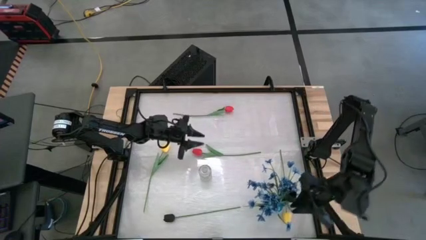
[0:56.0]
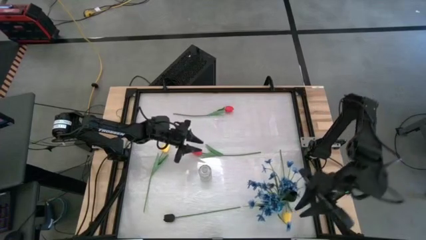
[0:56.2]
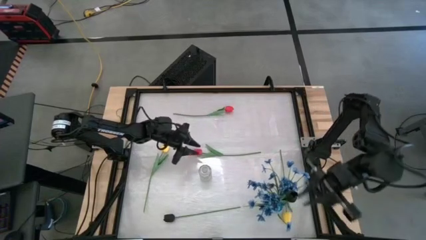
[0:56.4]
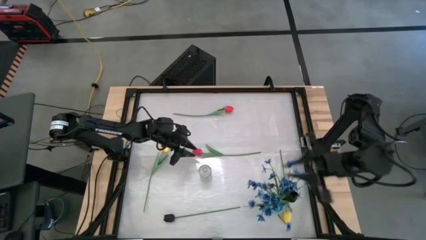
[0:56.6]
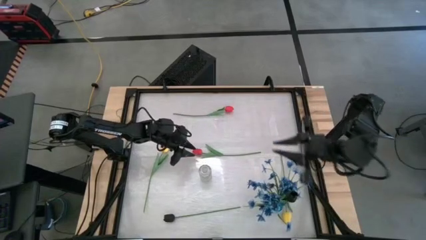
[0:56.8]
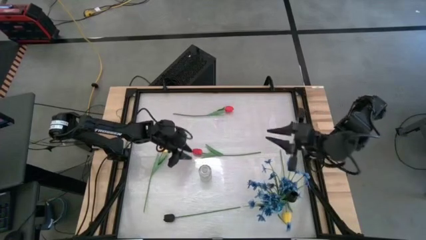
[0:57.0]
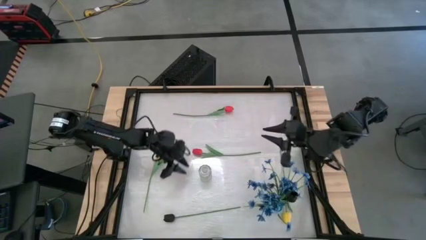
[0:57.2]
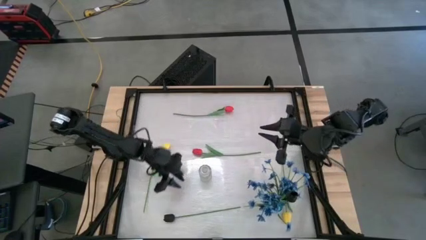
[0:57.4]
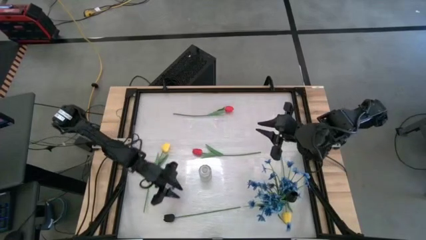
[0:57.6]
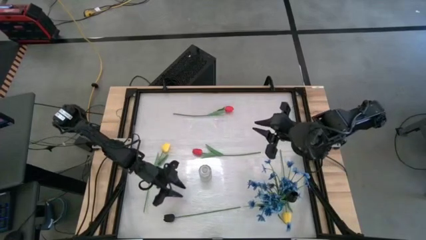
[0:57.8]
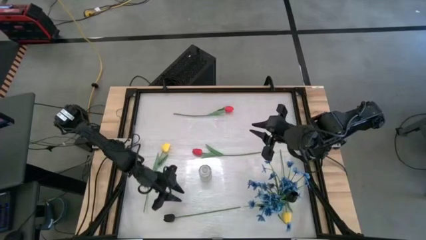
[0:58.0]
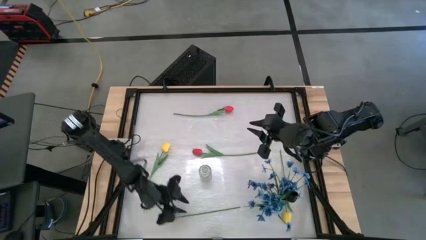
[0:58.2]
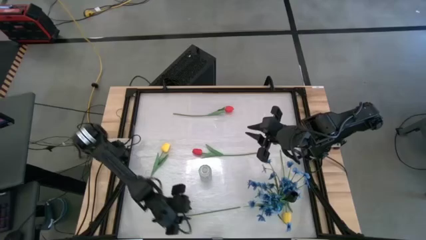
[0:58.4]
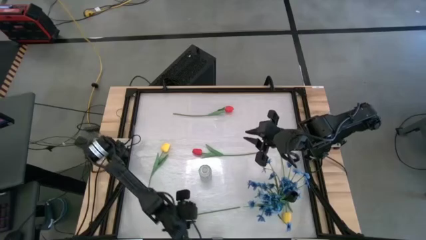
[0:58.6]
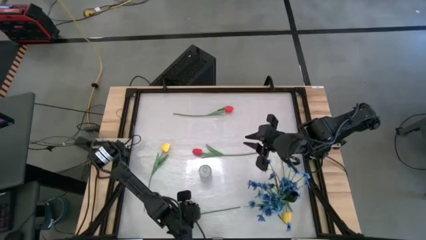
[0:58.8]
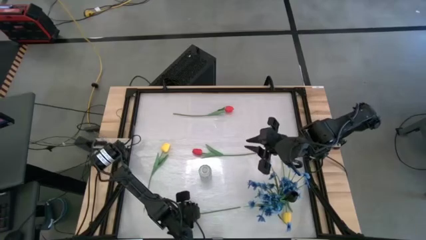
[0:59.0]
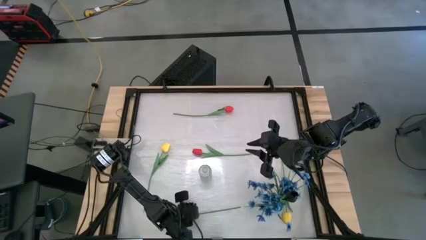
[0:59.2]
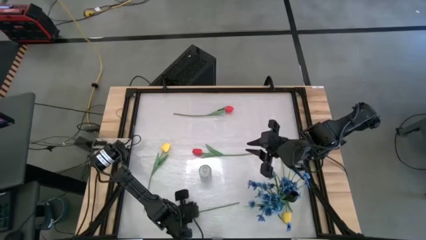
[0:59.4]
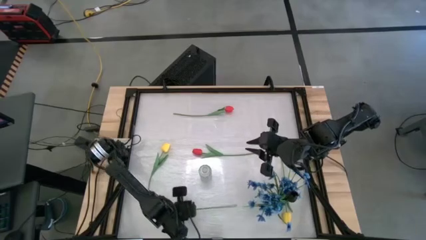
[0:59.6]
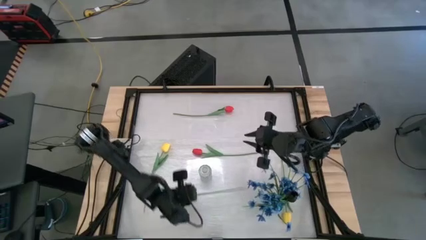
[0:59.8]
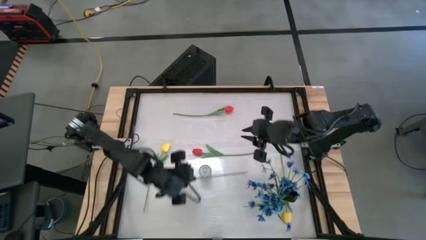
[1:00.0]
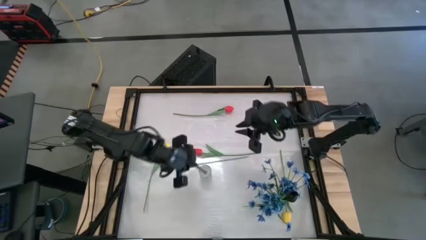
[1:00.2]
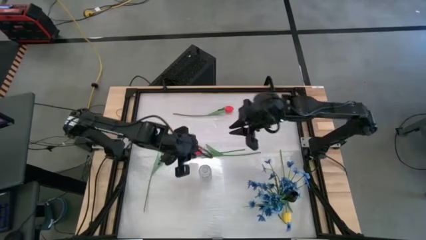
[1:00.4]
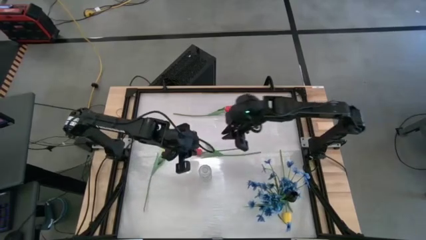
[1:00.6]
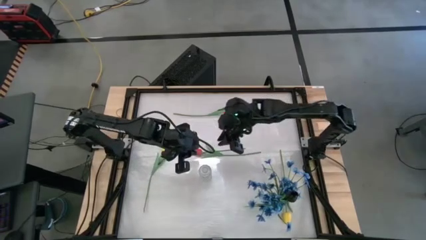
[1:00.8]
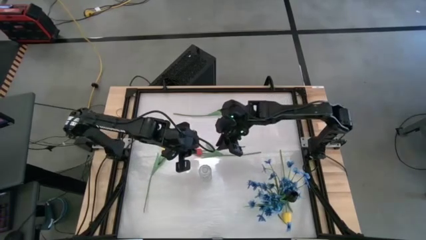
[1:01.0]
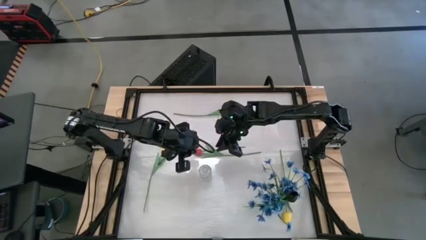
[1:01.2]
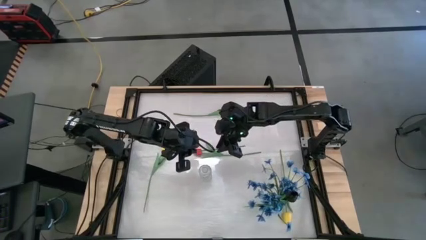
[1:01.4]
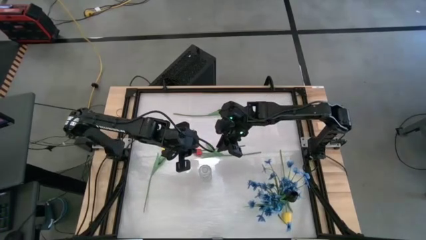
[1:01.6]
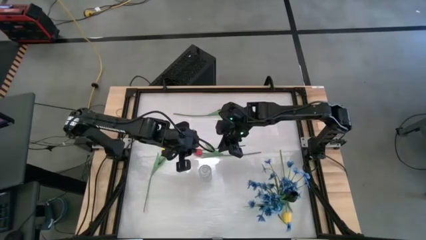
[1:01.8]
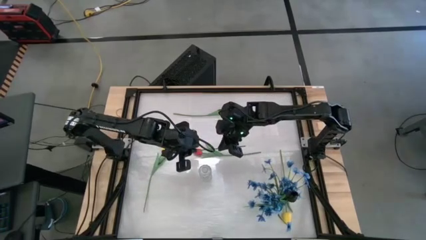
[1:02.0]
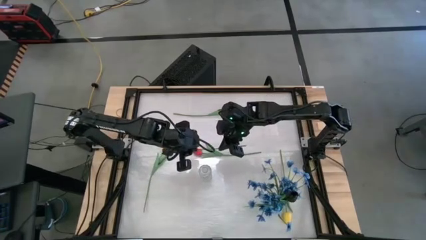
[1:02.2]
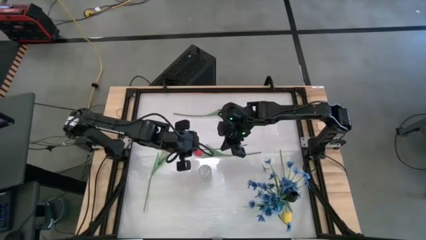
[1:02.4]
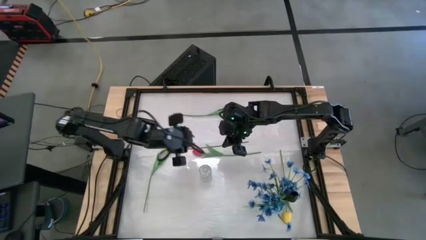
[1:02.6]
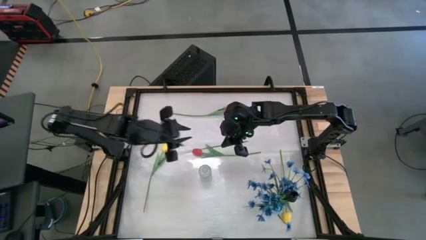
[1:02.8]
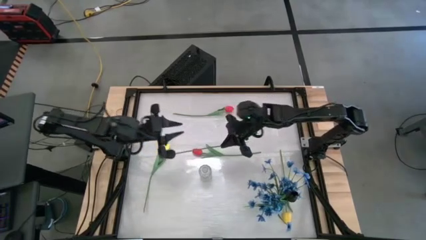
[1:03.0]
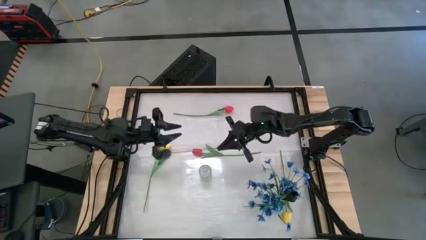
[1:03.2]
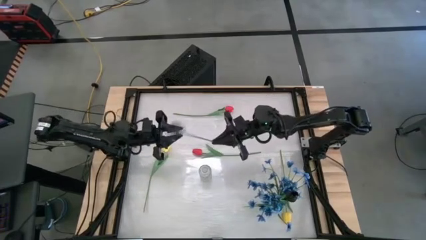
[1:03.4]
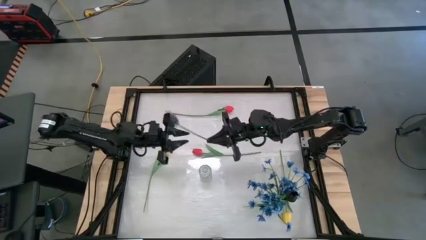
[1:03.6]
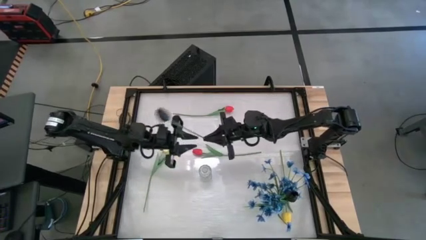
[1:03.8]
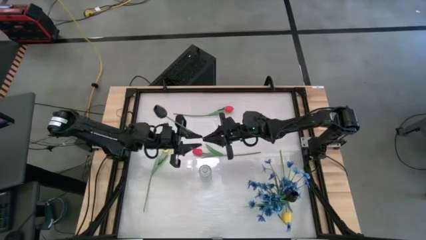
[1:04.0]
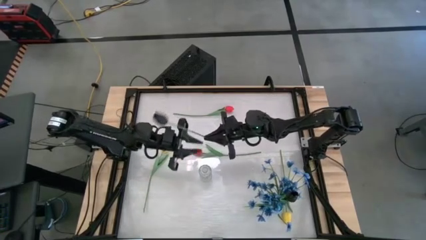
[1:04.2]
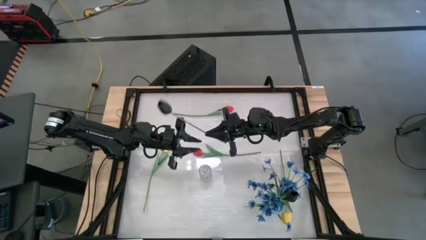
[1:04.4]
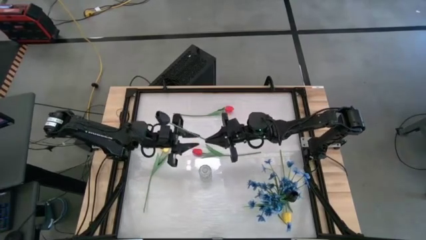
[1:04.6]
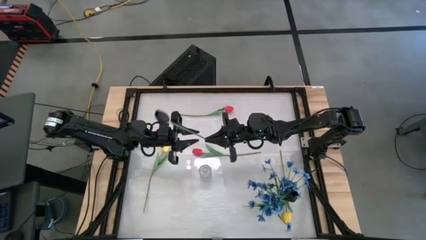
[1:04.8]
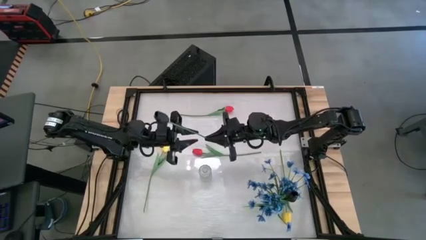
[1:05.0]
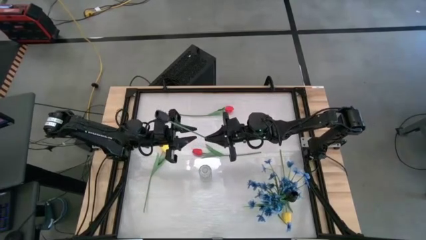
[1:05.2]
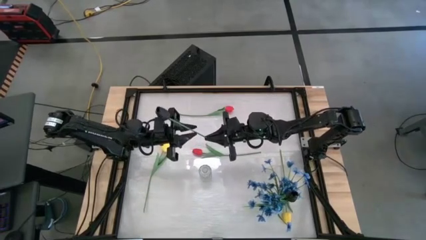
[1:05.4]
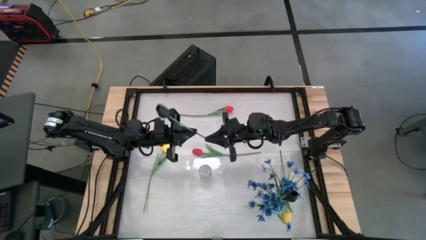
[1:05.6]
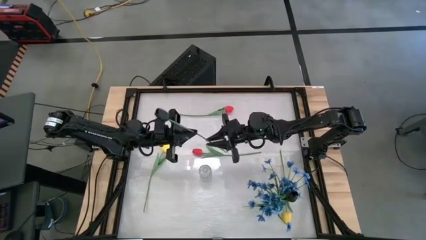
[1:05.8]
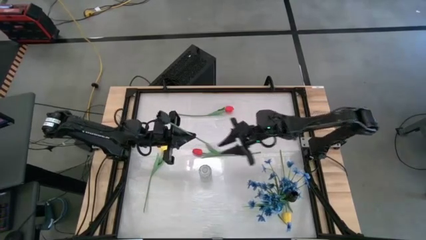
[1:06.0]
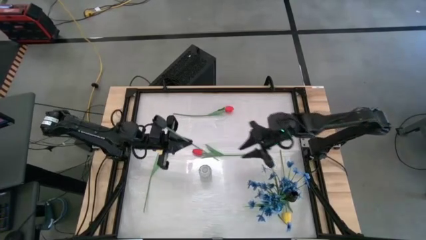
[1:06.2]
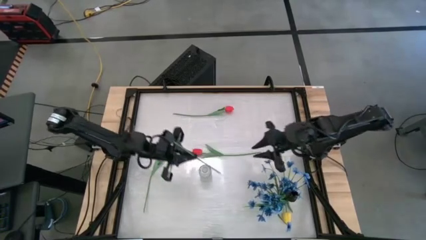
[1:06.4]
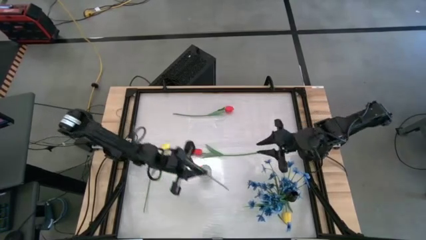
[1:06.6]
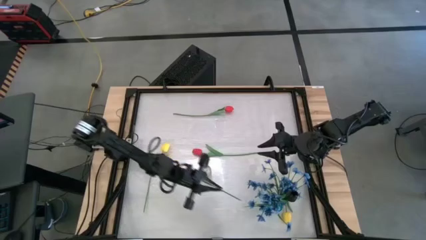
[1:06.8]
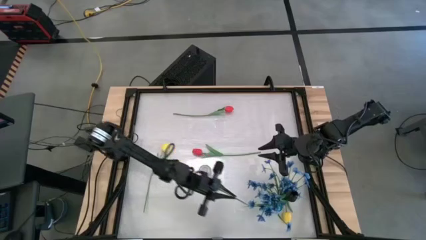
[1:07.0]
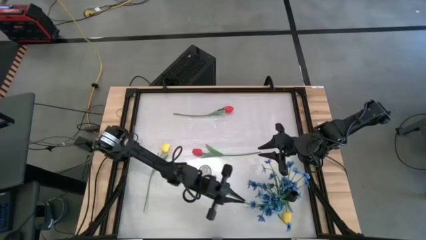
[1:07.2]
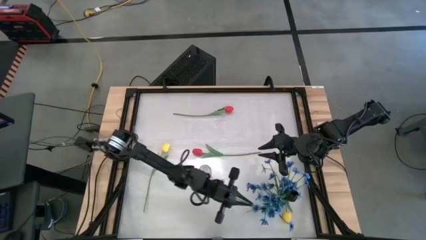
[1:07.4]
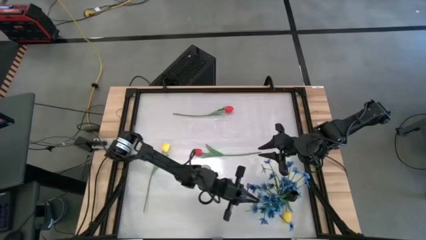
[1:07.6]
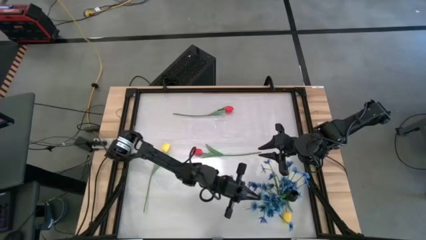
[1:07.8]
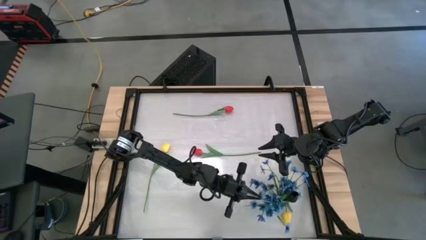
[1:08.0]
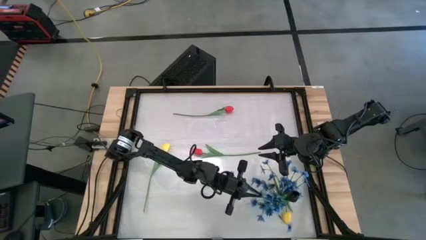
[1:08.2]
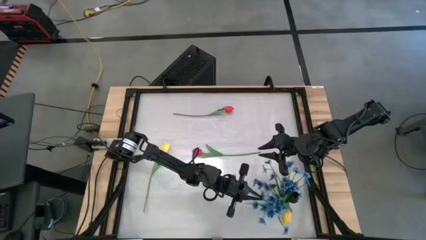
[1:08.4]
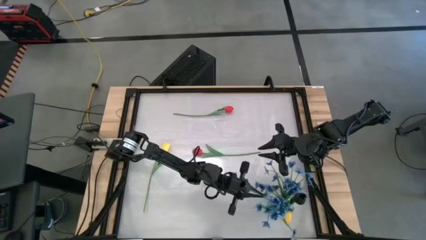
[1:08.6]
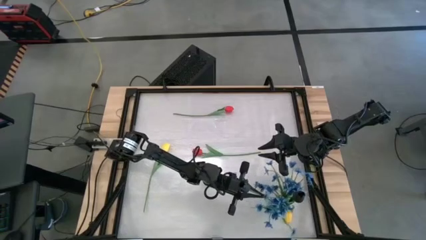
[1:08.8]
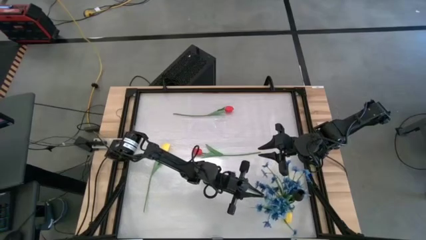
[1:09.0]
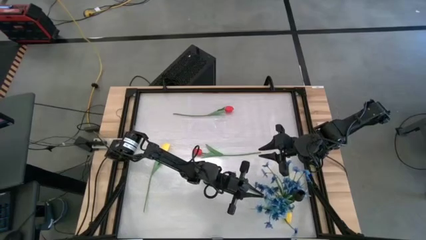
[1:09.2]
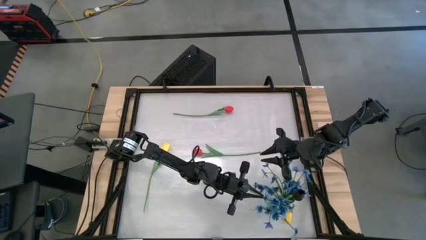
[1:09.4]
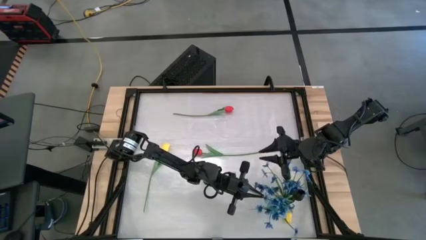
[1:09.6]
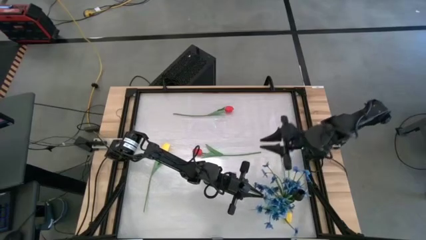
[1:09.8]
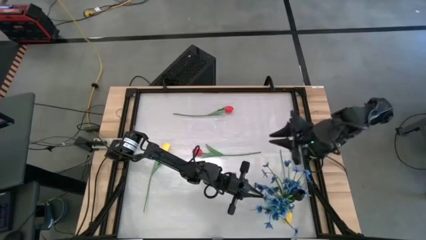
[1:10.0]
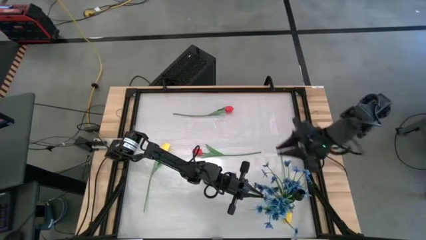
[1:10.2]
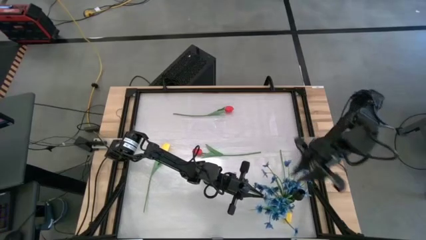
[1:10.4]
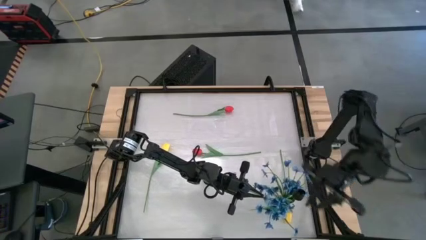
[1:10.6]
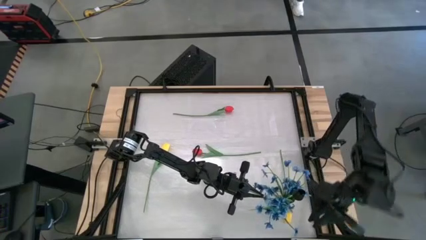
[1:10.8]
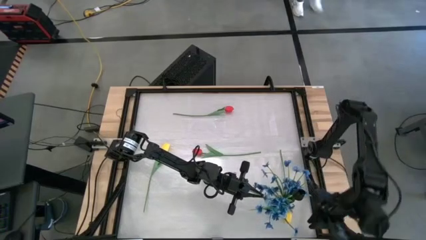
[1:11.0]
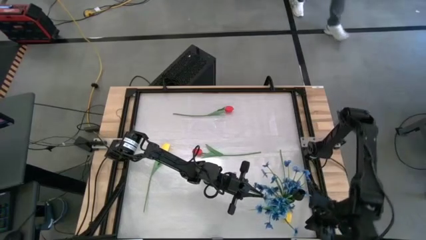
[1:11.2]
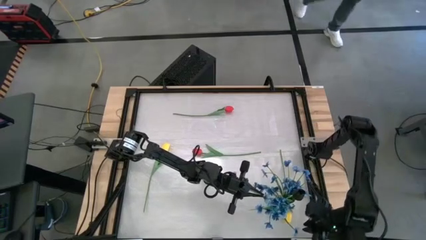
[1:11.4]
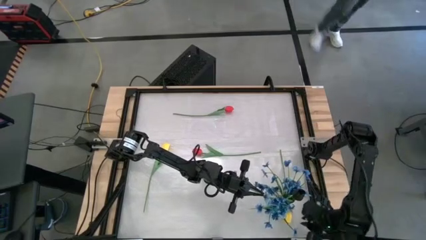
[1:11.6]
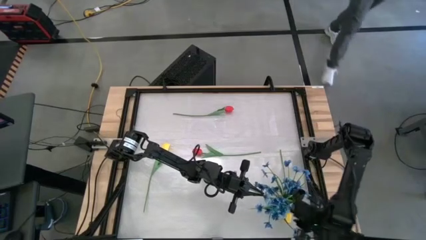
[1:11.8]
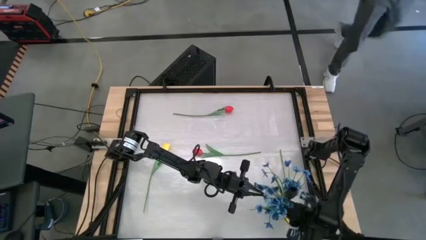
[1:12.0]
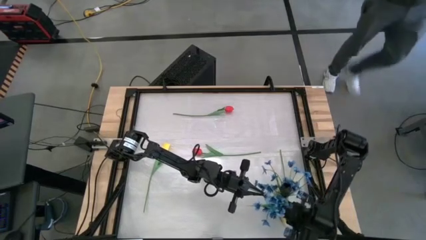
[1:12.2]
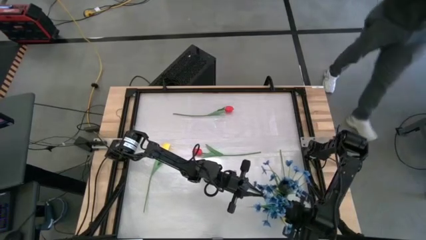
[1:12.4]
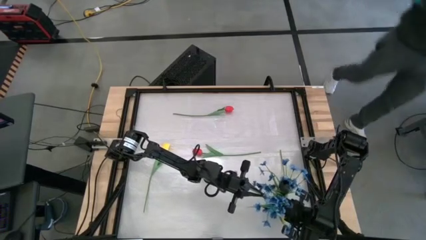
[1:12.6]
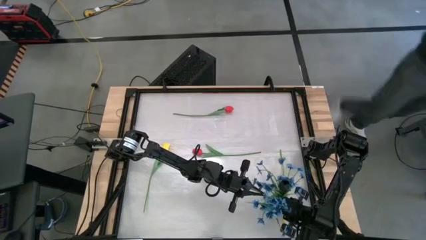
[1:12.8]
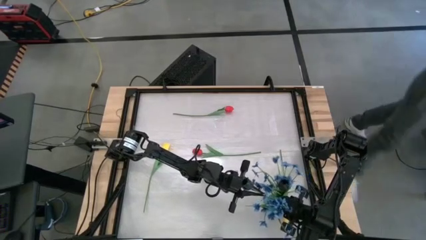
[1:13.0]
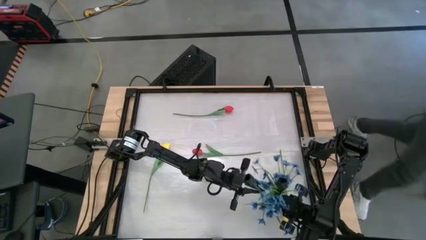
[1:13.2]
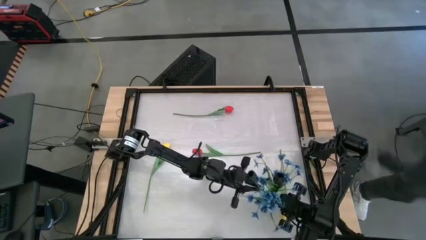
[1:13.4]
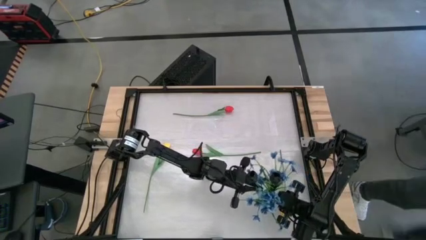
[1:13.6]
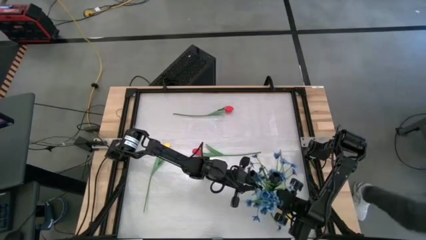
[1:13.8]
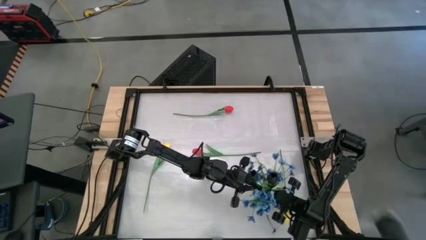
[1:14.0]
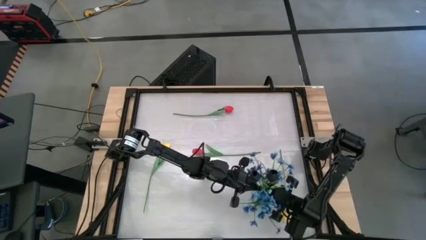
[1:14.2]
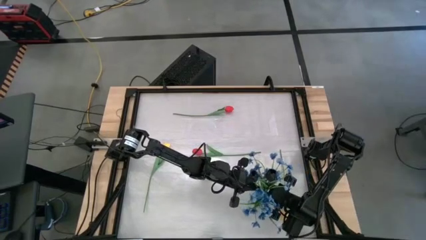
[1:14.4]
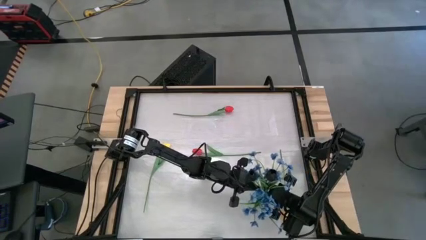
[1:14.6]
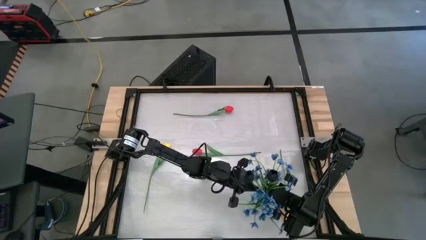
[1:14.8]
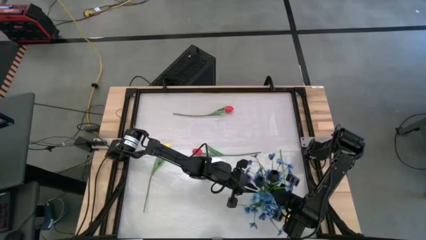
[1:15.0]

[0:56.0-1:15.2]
Task: Sort flowers into vase by color
Put the black flower into the blue vase
